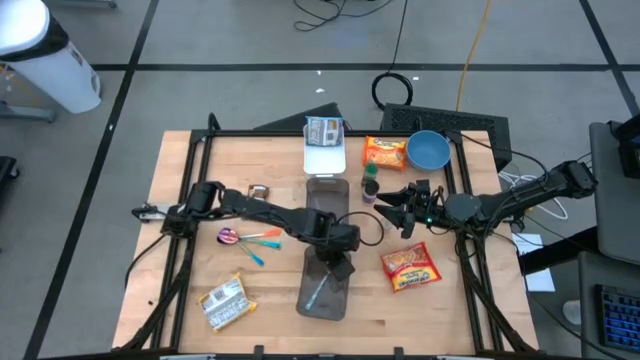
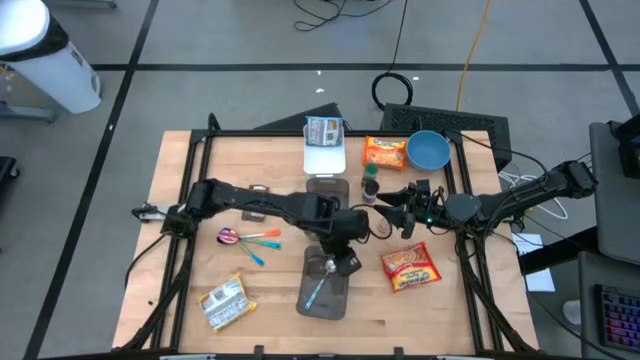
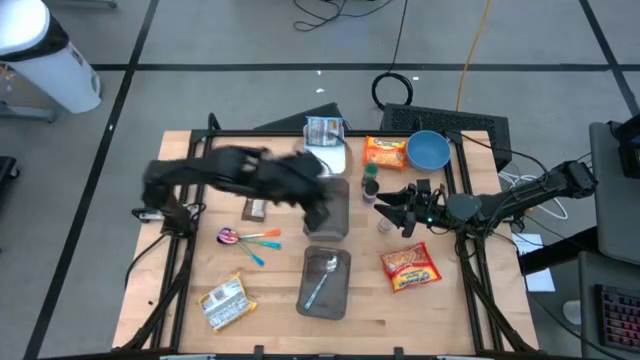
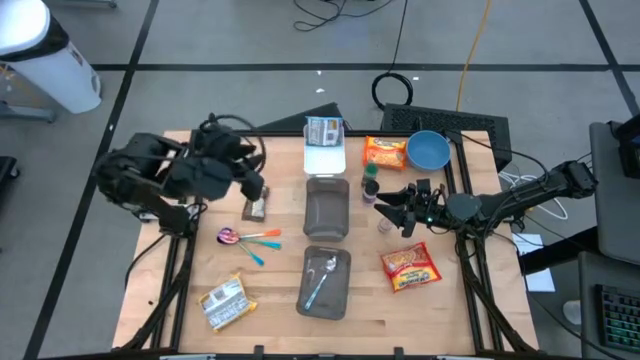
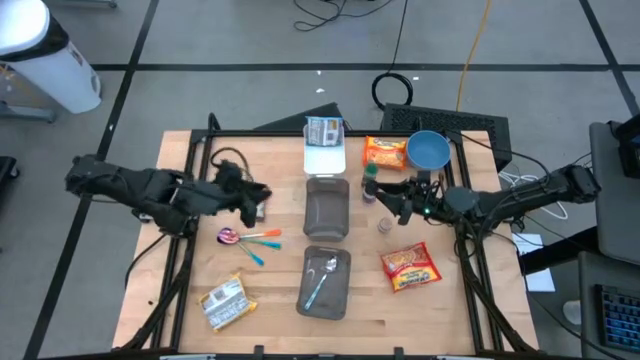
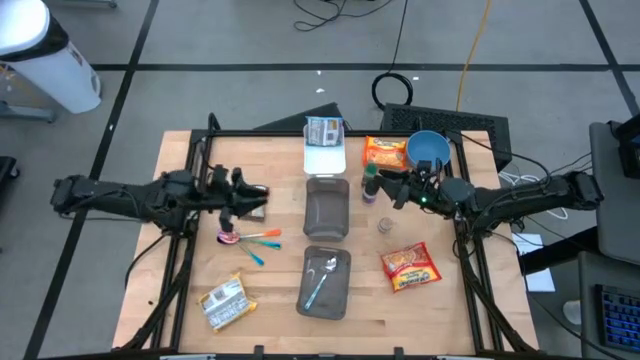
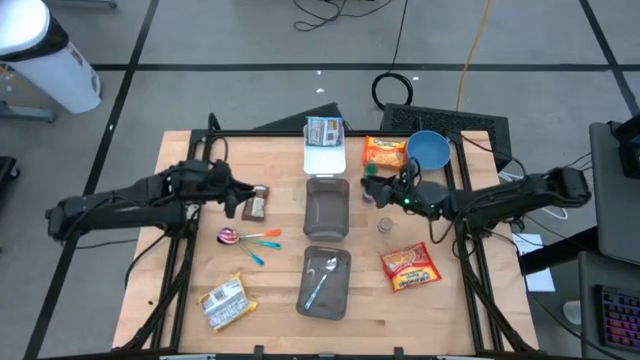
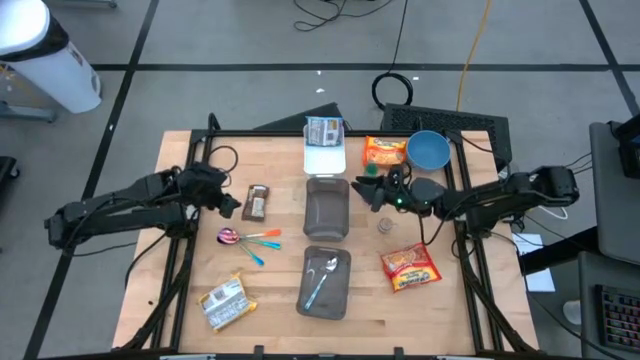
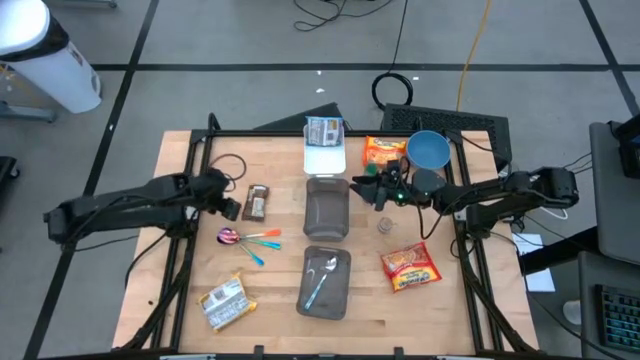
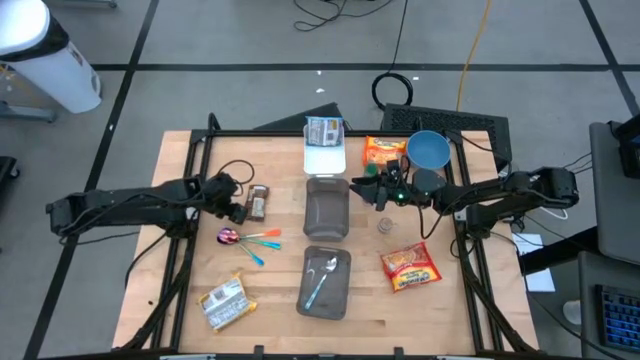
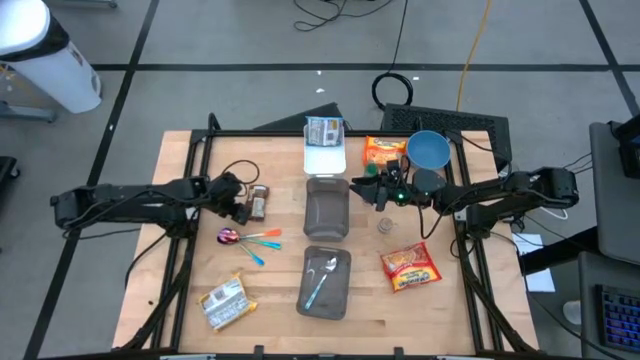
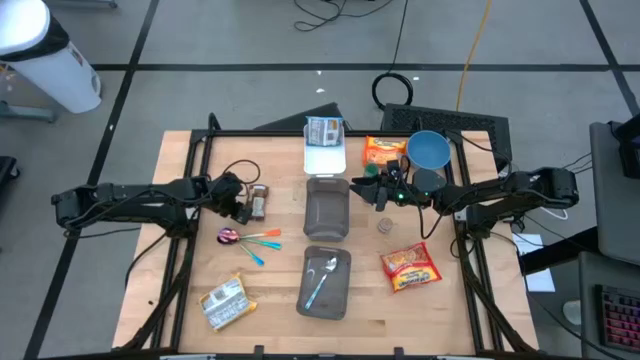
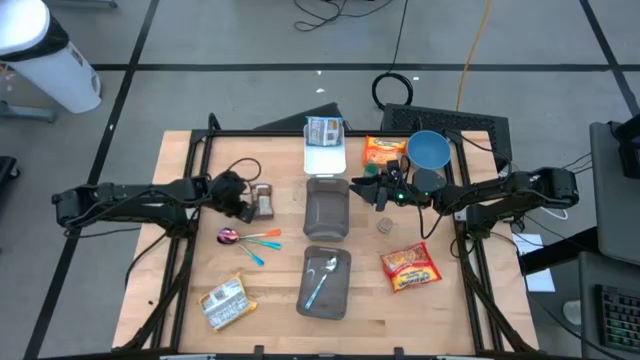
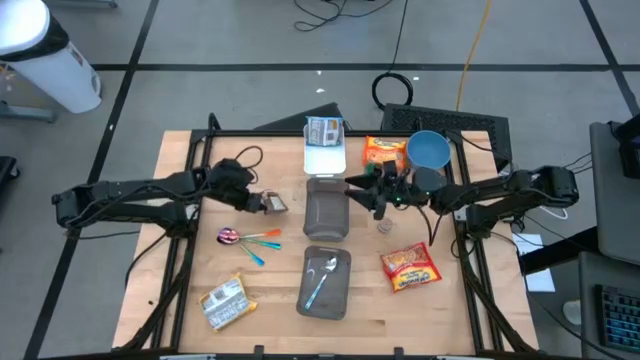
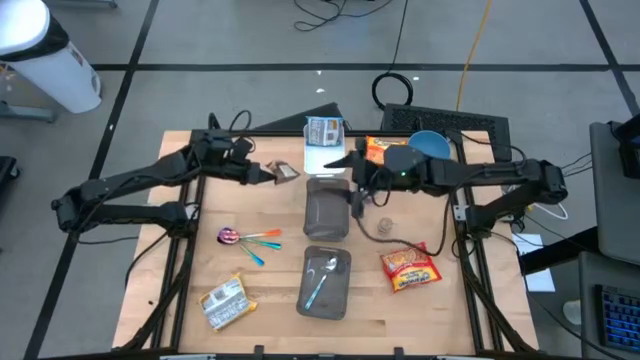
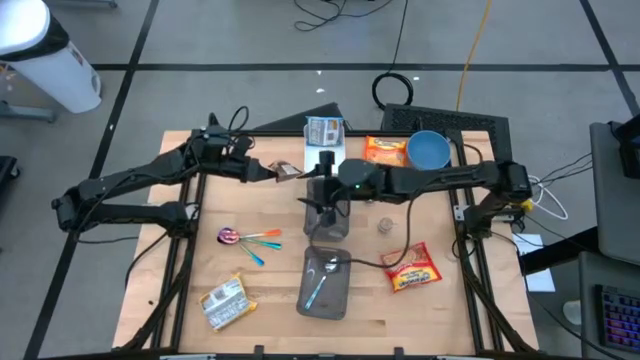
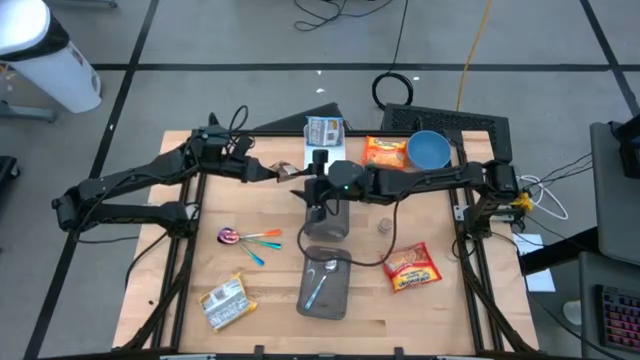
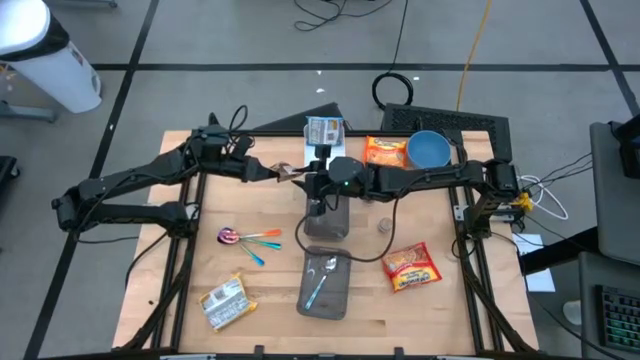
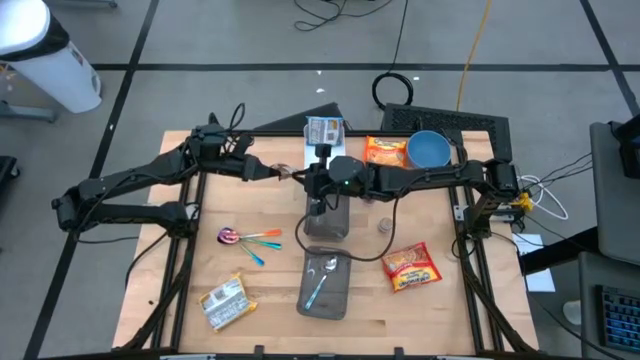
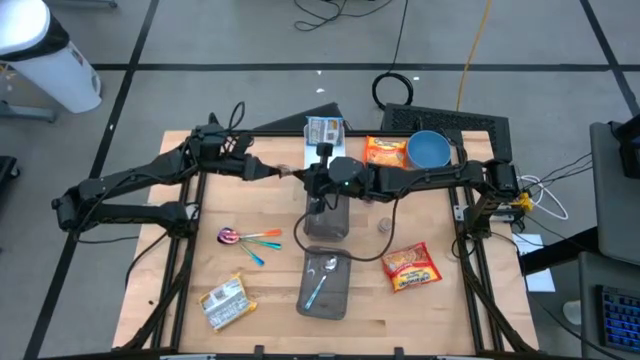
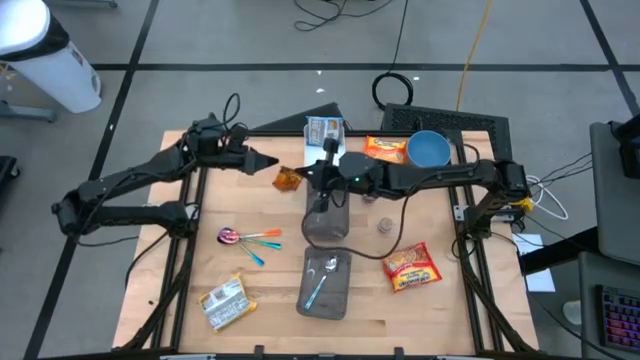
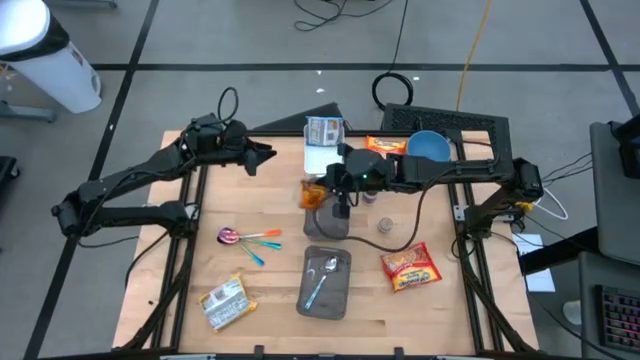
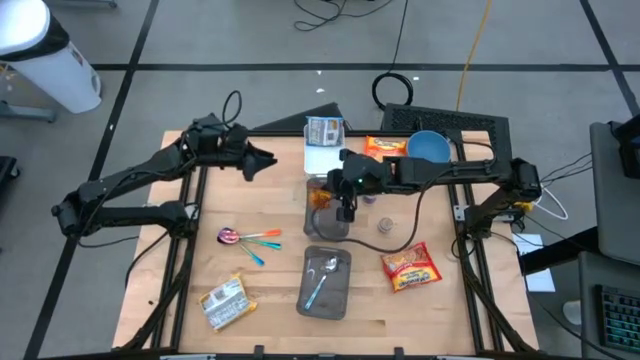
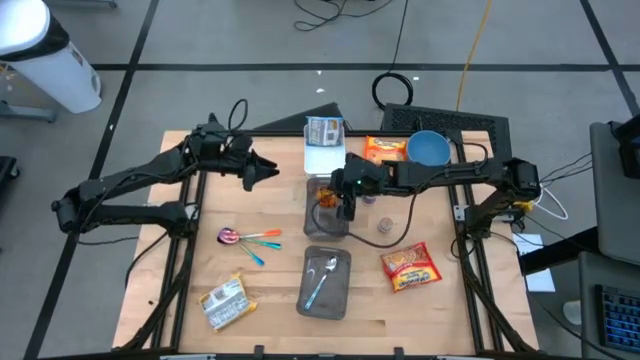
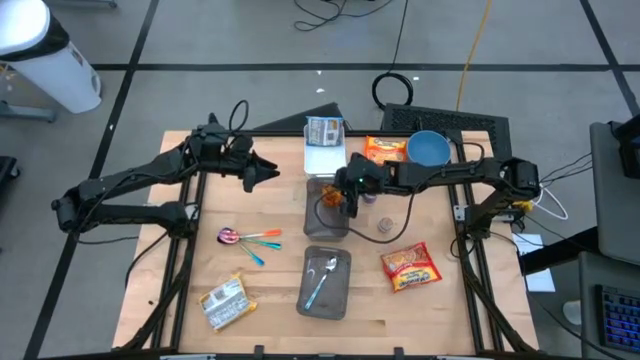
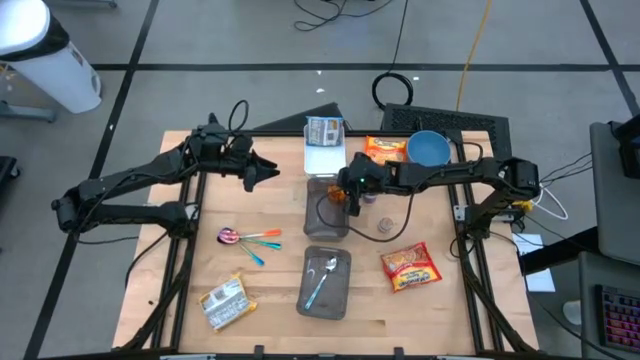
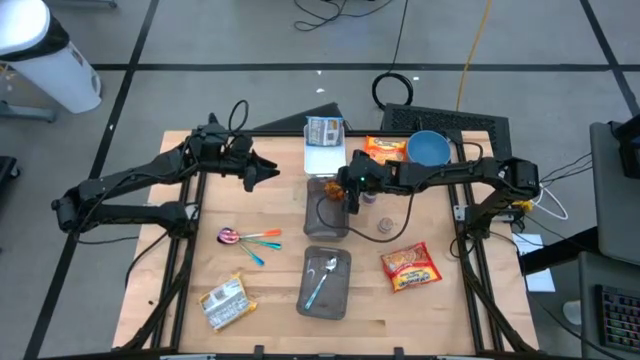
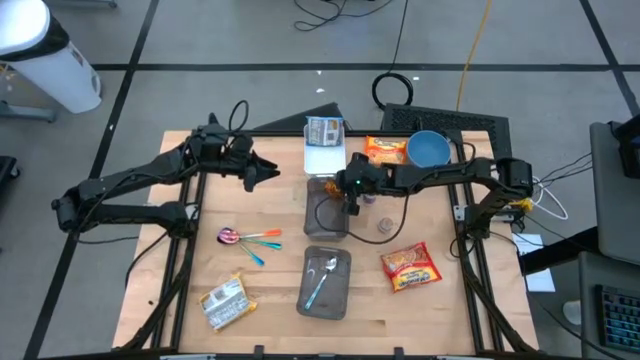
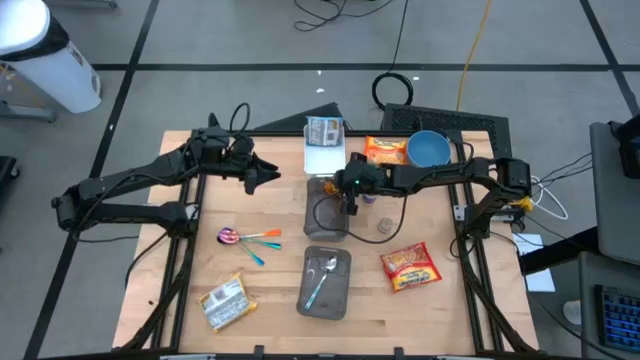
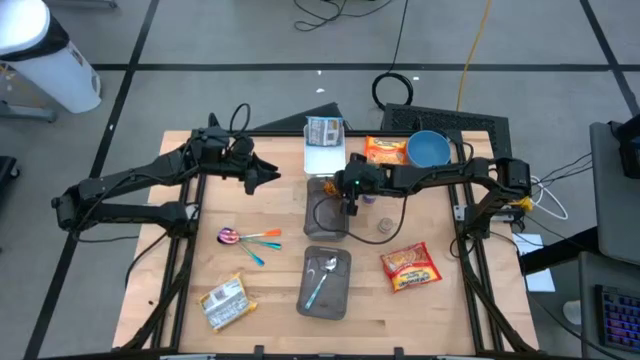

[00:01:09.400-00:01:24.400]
Task: Pick & Place Food Item
Put the orange seasoning pack into the top black bin

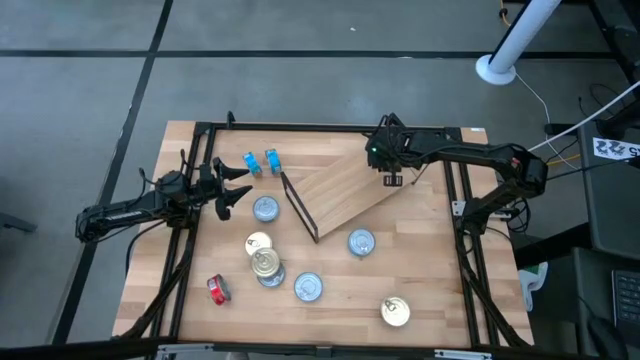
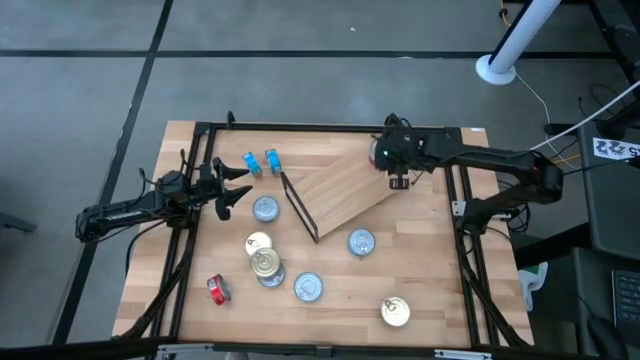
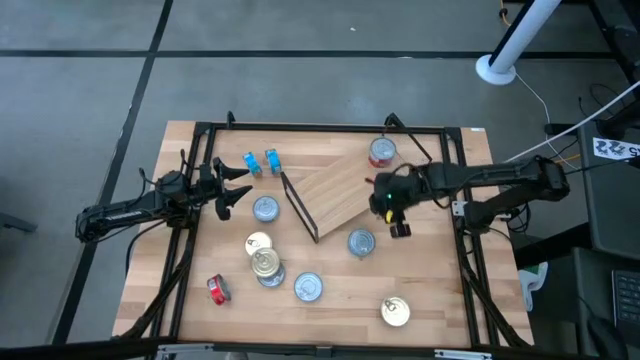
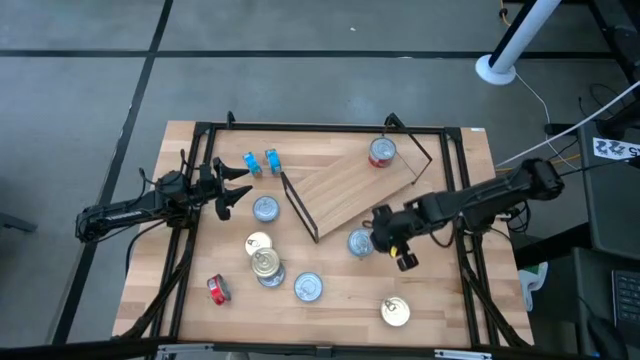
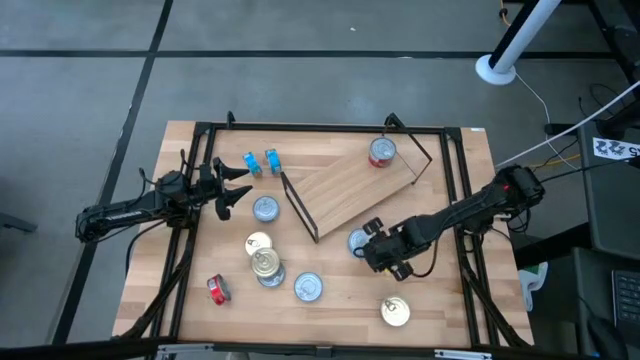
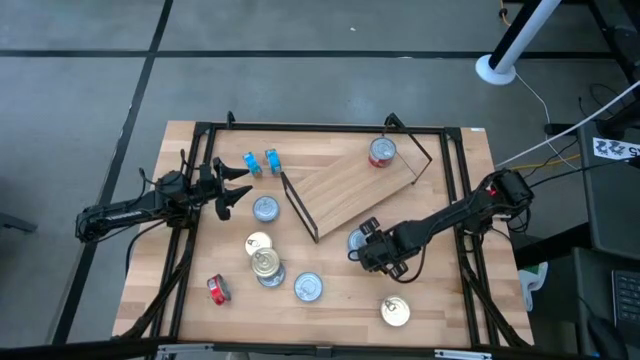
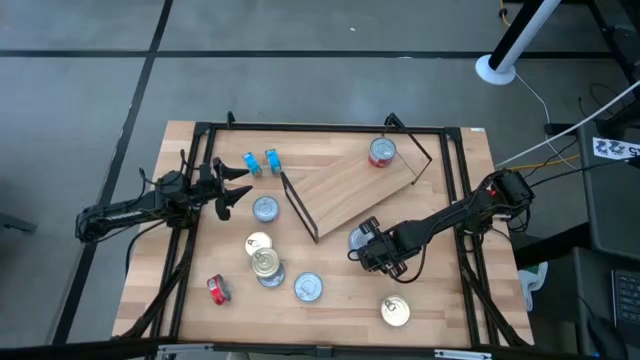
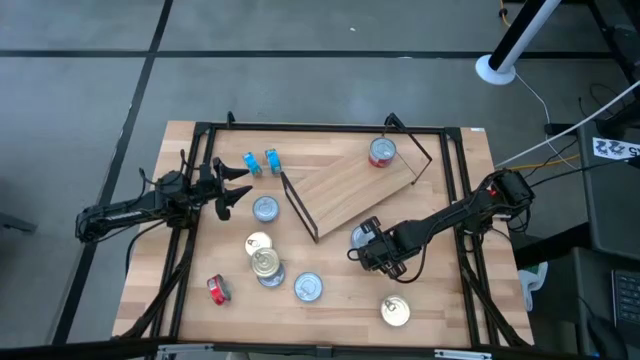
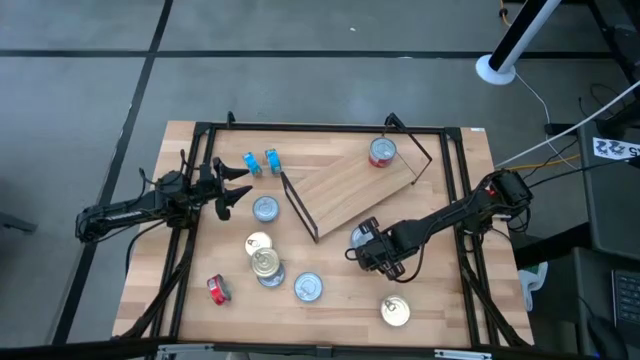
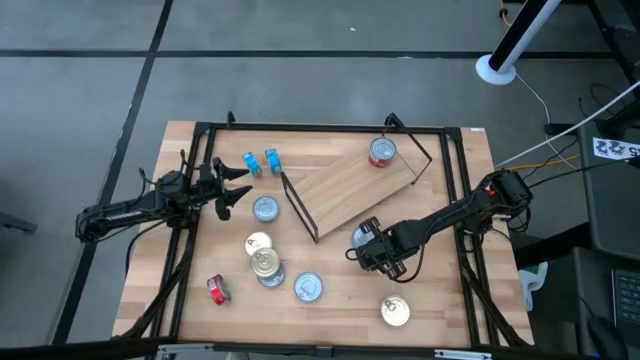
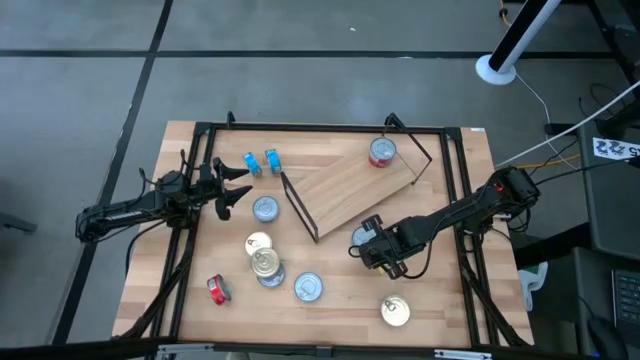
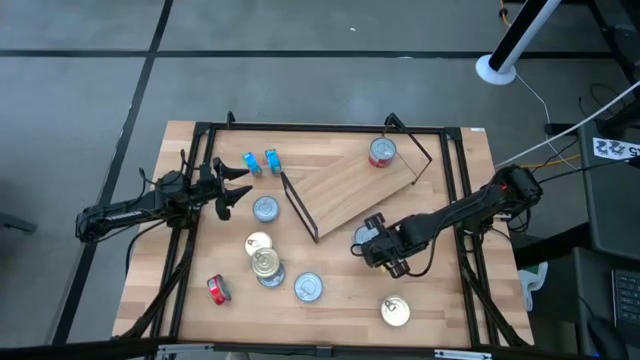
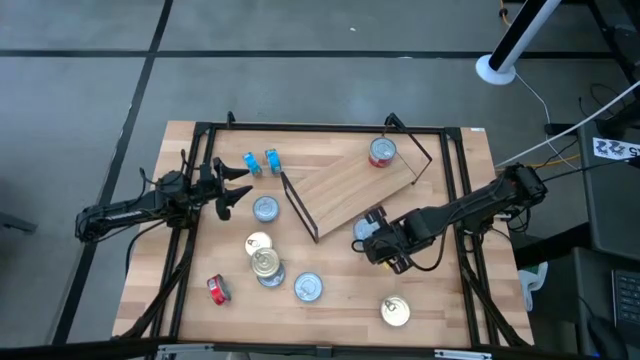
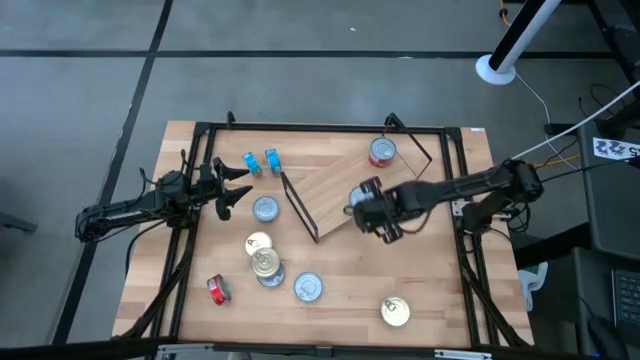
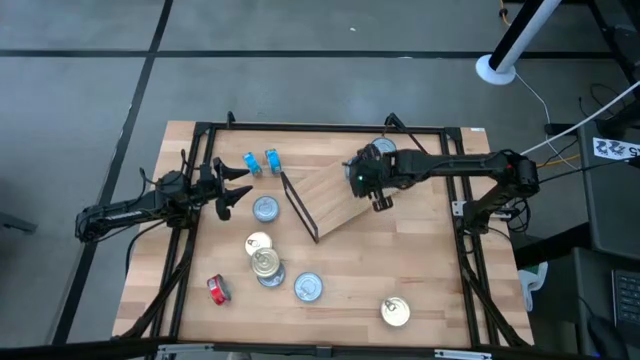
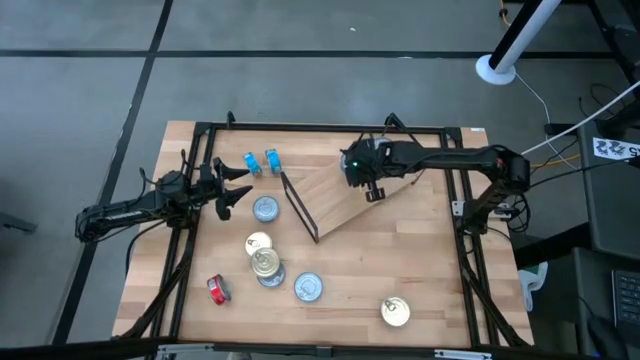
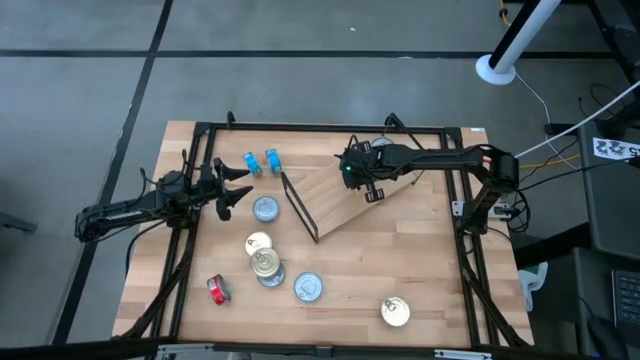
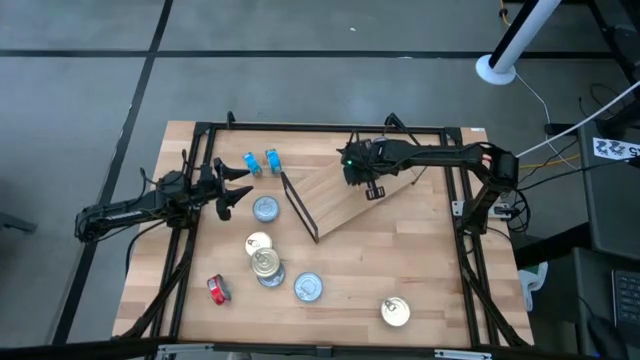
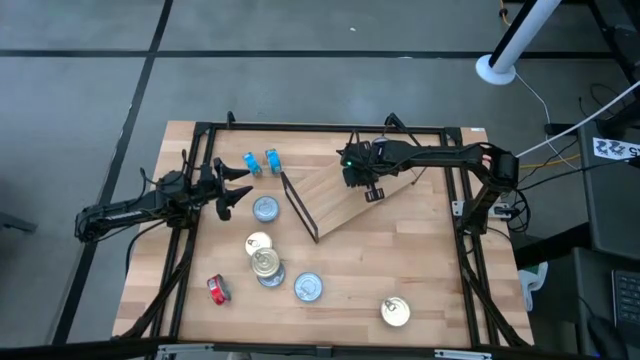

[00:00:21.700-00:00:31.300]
Task: Stack canned seafood by type on shelf
Put the light blue tuna can on the shelf
